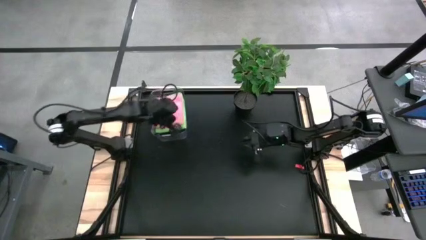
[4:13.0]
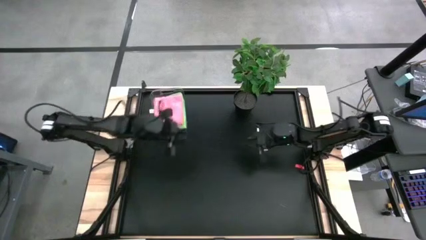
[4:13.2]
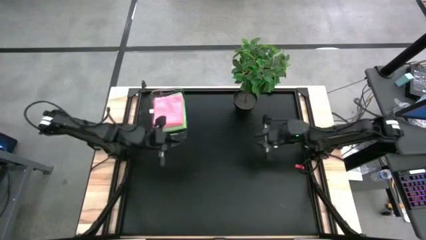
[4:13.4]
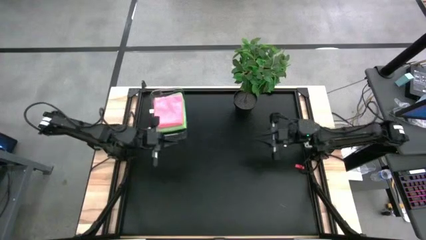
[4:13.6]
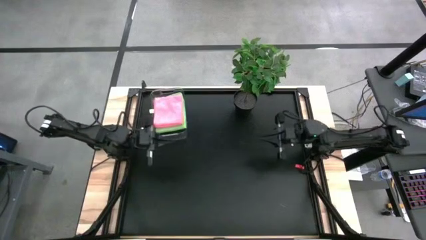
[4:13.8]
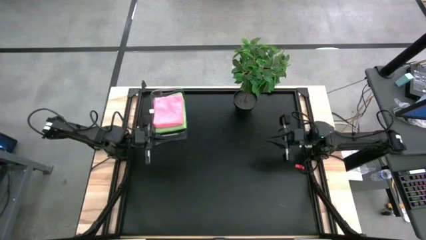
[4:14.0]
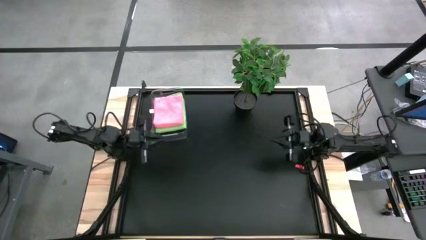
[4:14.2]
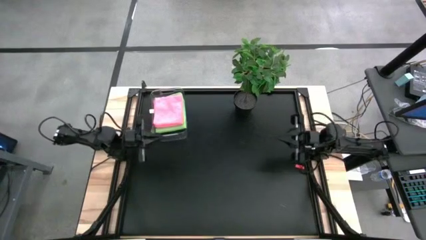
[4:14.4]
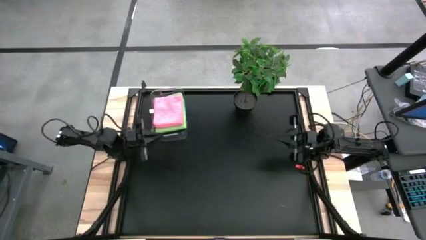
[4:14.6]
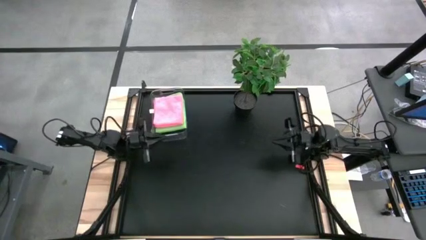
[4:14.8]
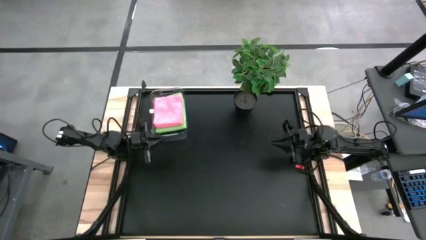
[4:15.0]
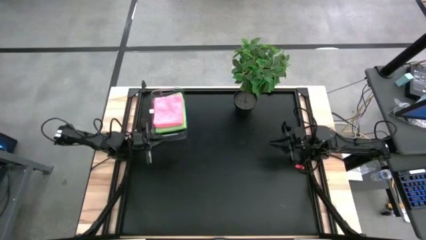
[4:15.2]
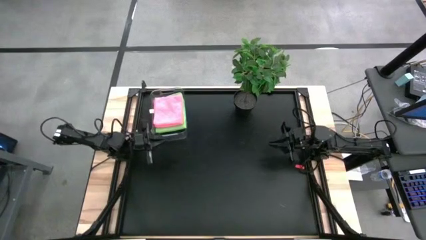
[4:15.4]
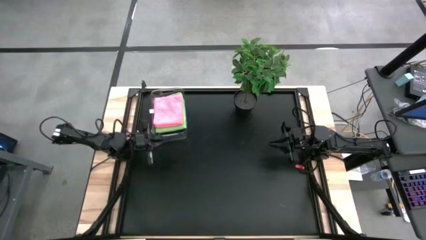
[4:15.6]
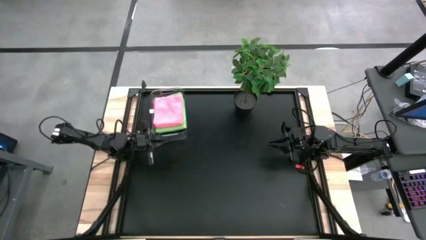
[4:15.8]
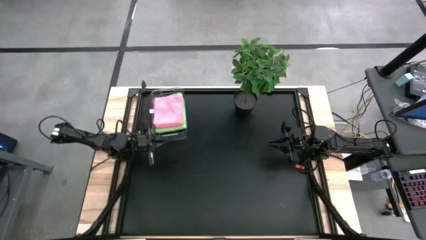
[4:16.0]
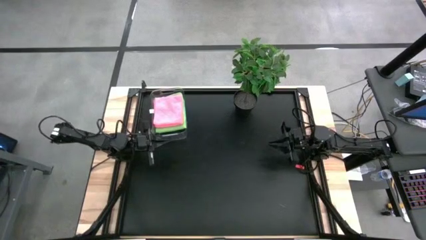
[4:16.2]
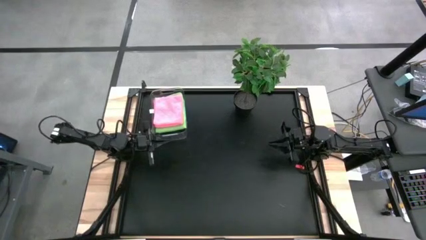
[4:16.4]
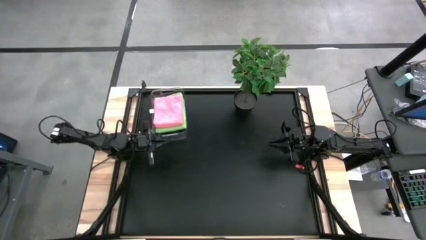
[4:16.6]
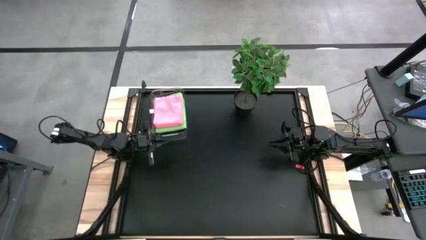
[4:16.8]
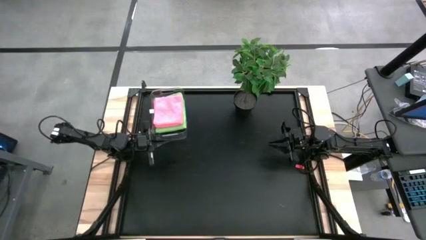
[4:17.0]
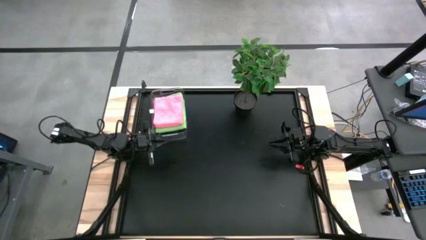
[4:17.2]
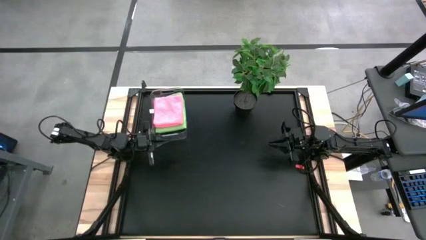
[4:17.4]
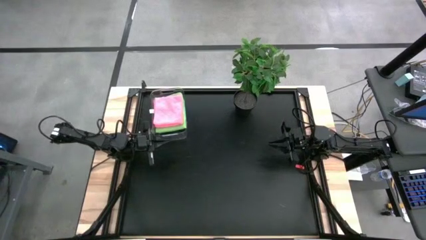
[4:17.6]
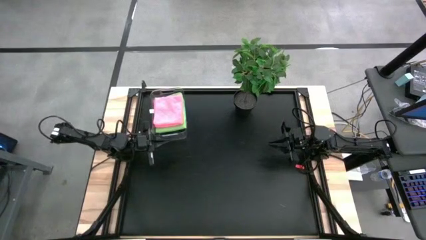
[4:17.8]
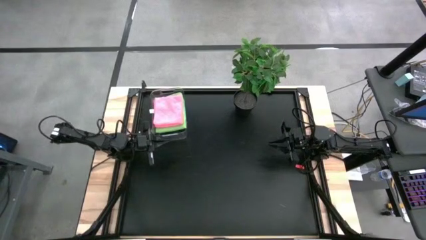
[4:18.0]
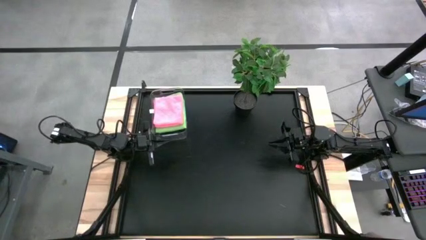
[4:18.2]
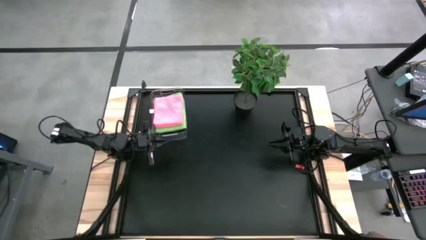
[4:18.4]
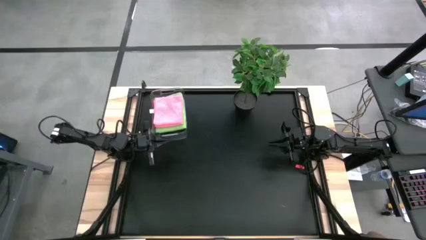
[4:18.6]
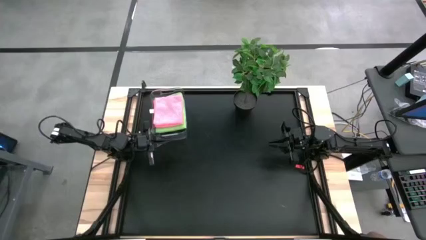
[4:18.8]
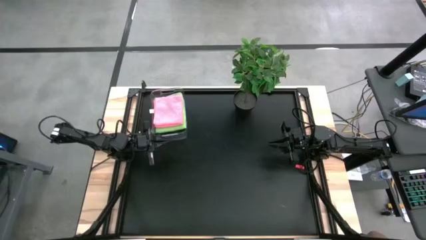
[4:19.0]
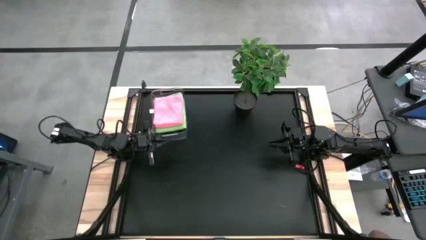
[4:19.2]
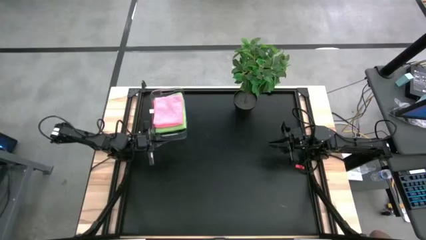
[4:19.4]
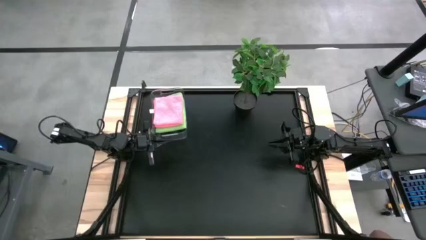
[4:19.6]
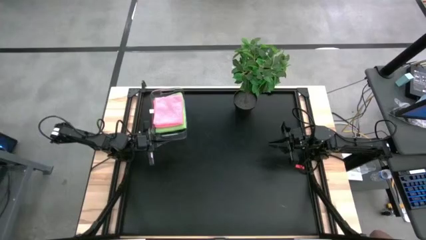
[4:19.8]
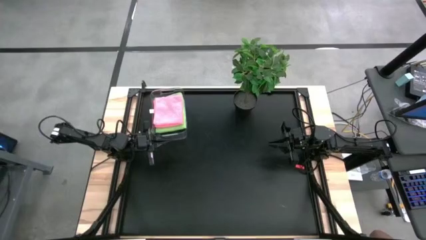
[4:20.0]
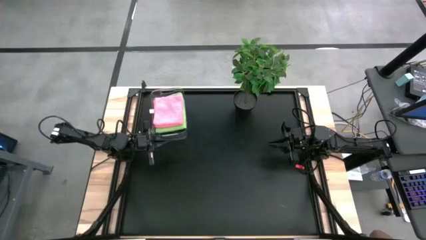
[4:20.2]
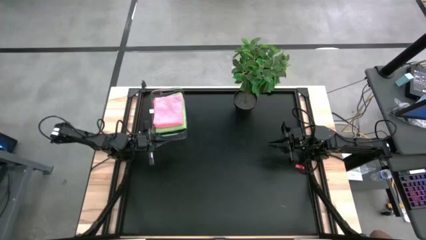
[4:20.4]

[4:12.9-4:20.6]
Task: Fold microfiber towels
Return to Home Position

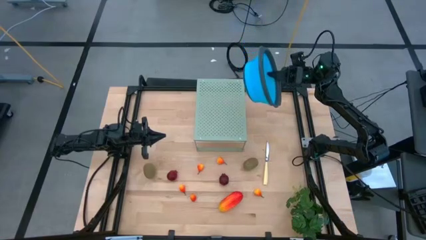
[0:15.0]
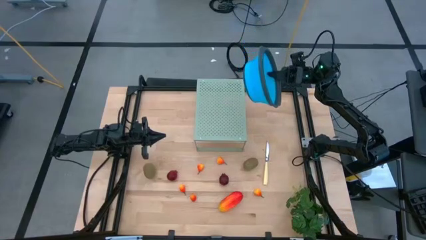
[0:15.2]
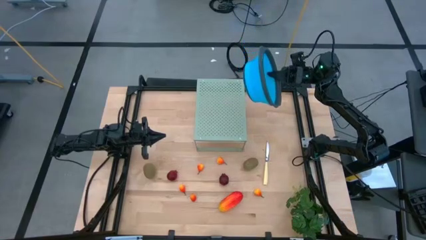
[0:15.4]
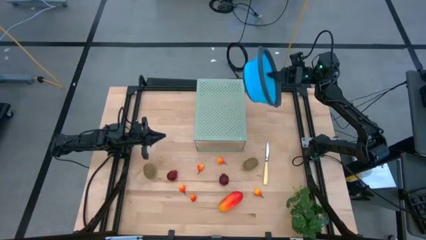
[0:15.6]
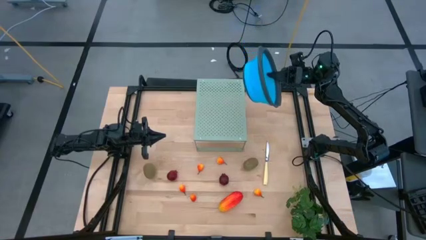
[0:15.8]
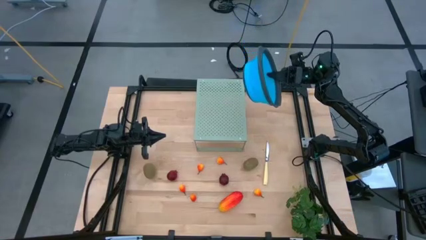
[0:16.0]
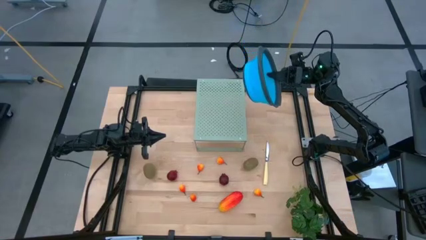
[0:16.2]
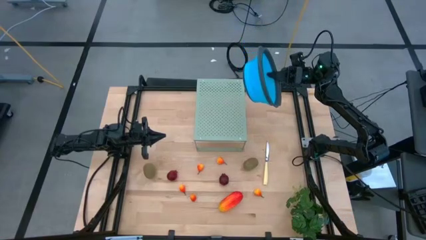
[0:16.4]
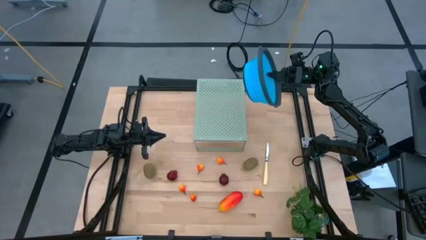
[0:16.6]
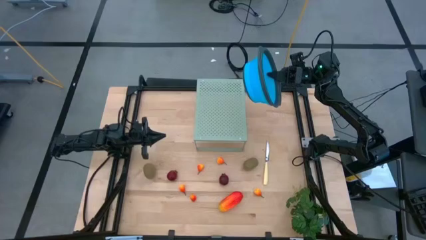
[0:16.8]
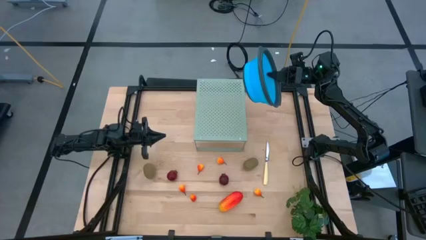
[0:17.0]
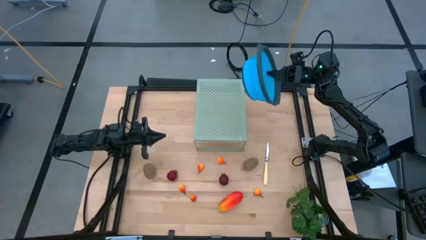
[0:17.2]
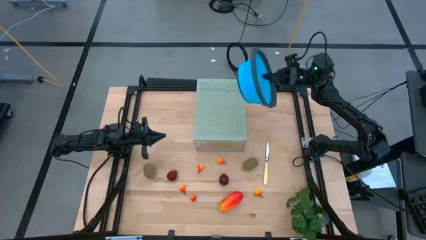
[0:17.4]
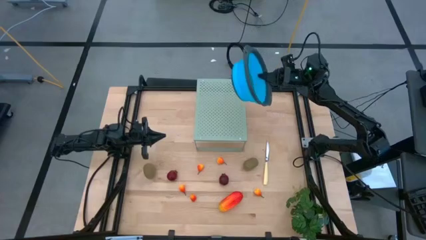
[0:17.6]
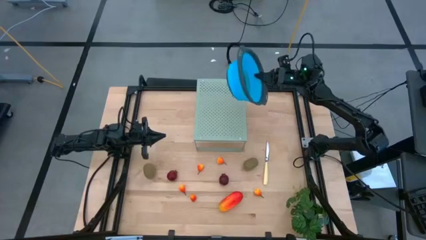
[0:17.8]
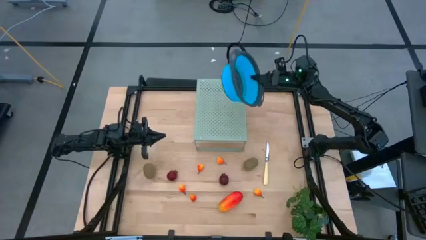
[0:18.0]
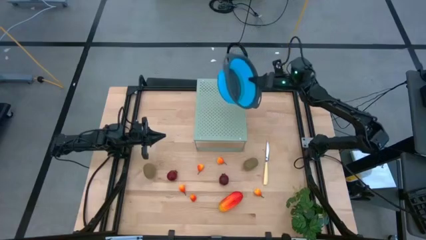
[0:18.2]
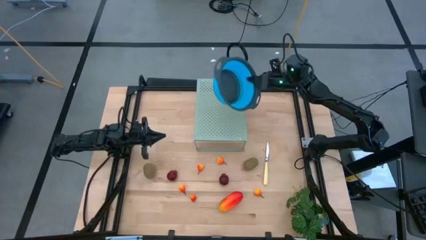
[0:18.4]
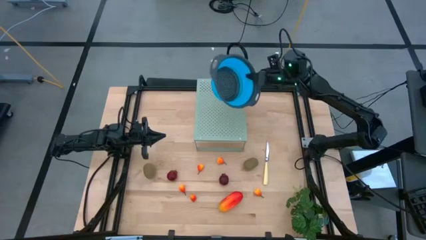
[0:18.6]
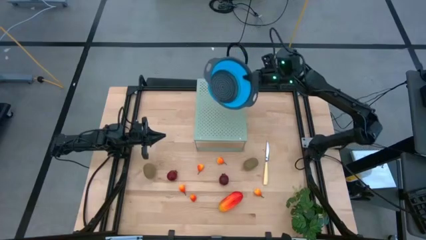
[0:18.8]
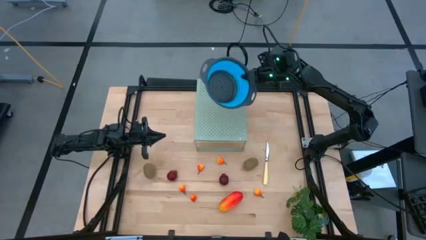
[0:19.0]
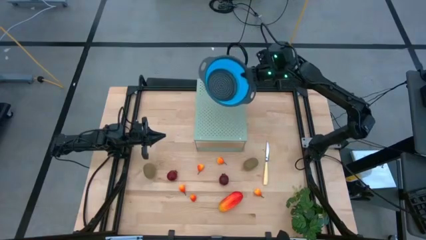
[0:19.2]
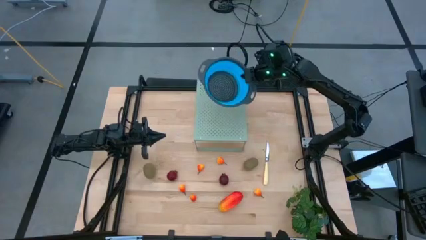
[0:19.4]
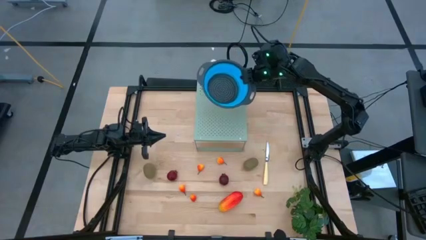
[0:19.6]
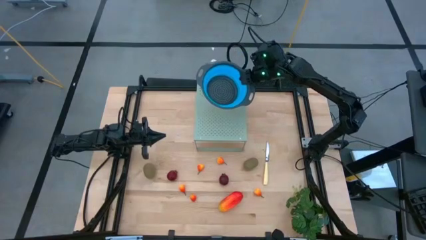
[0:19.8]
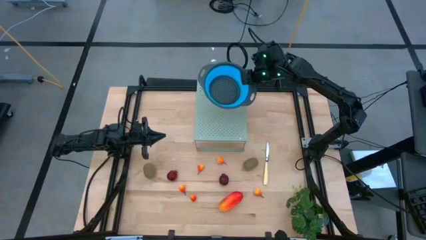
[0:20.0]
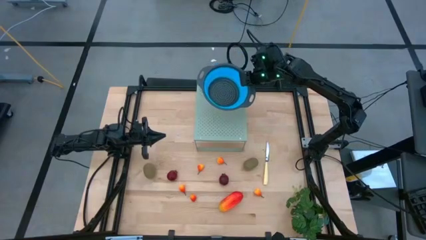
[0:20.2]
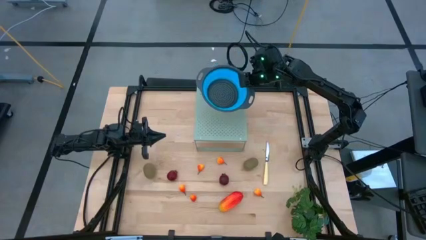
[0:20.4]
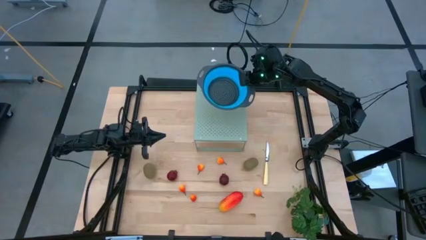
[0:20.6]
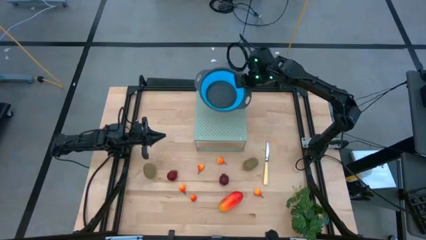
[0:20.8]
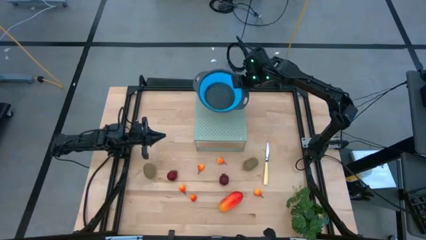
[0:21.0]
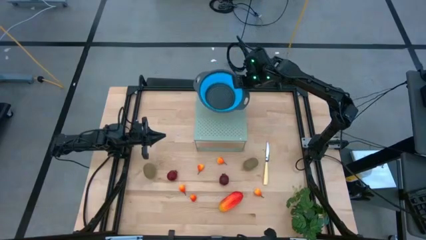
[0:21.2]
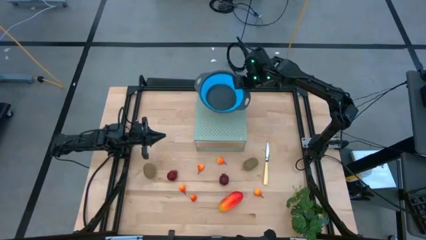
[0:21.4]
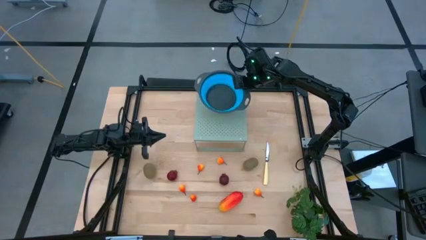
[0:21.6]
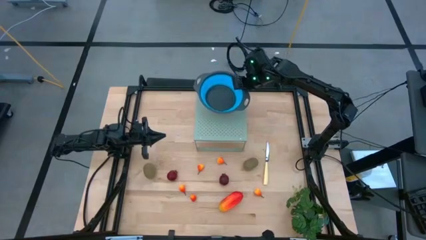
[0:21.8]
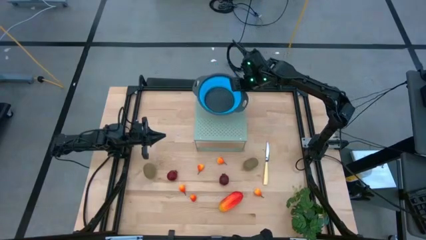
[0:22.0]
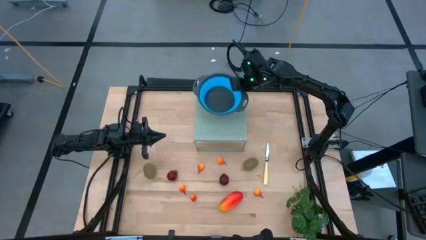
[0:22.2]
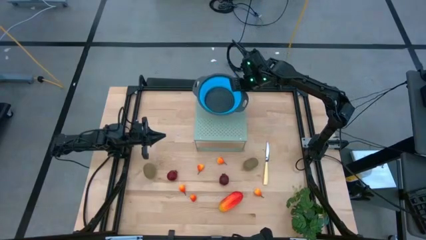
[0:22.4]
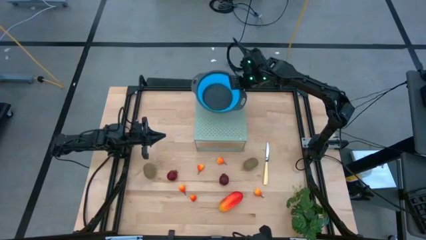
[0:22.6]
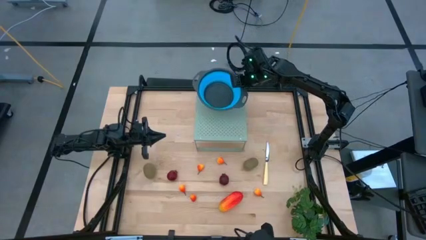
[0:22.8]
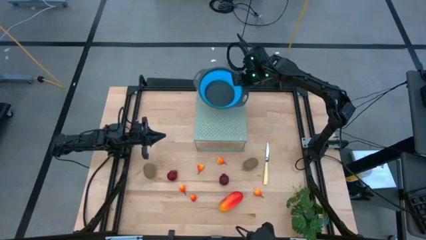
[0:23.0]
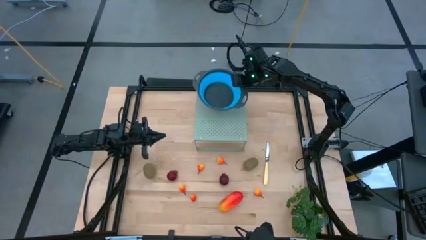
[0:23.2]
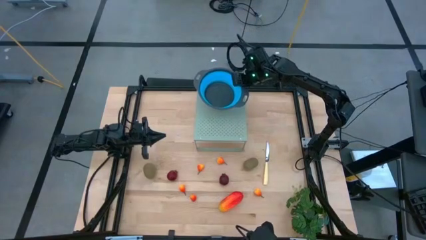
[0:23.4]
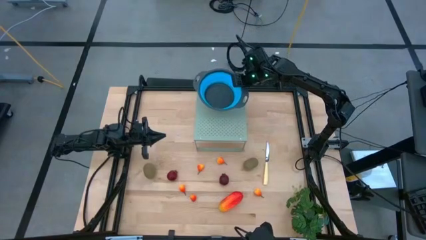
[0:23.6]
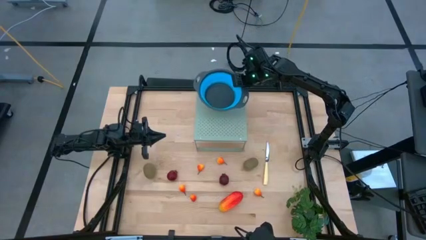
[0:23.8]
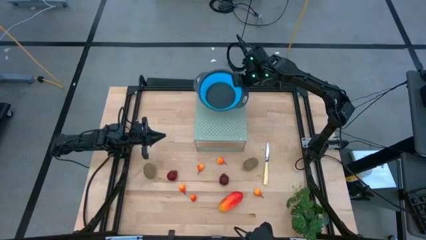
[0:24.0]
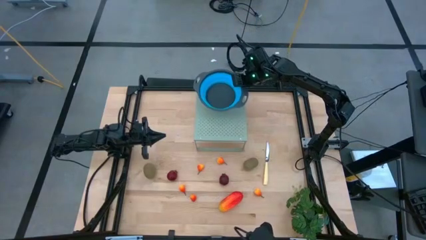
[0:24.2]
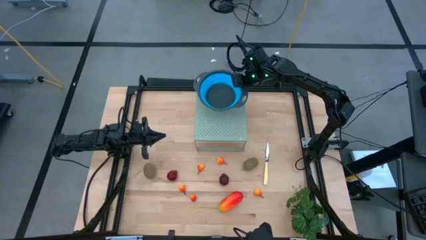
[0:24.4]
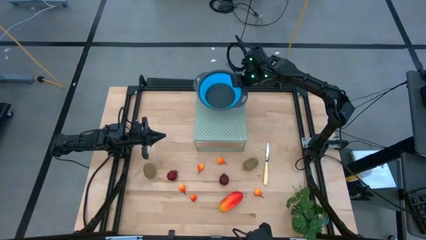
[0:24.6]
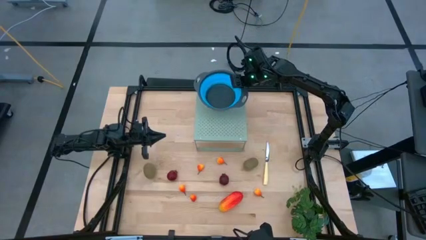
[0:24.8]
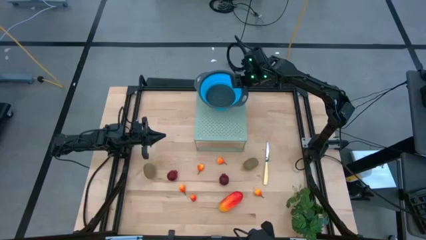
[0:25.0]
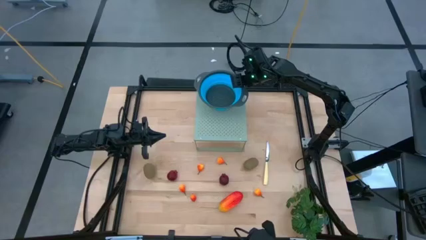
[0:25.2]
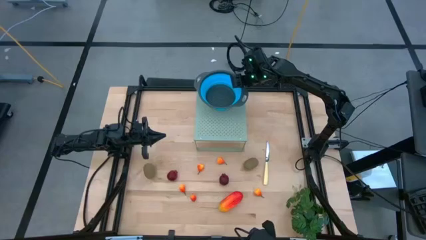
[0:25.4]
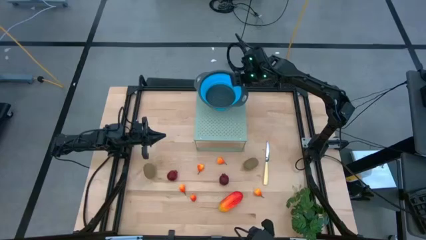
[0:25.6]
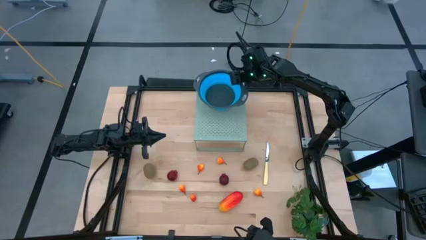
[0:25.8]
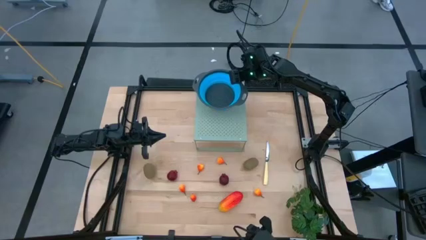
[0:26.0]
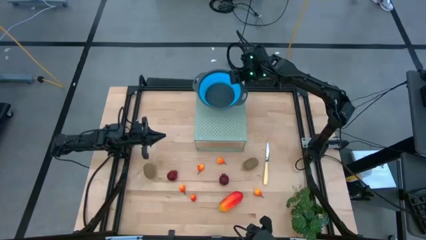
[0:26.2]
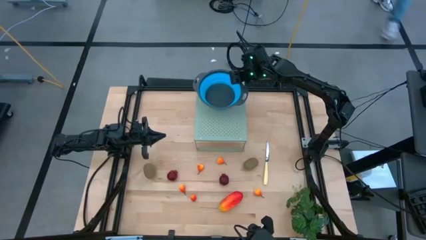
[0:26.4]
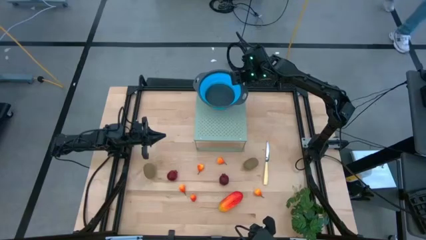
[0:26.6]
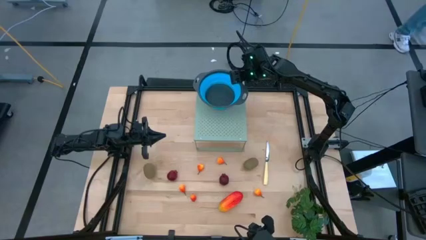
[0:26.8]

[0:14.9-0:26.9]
Task: Pick & Place Fruit
Put the blue strainer bowl on the shelf
